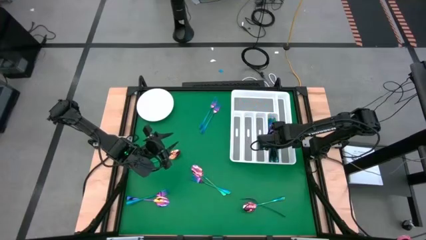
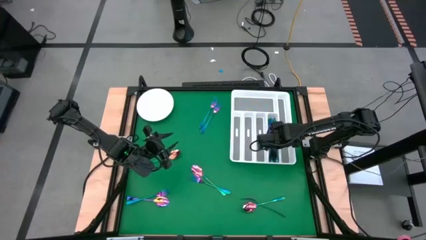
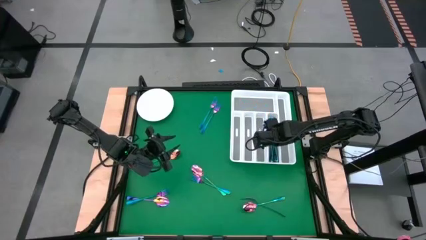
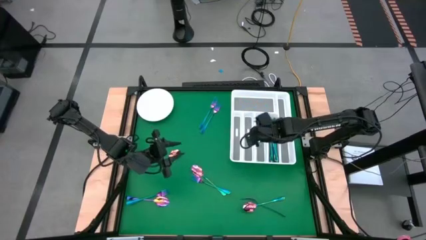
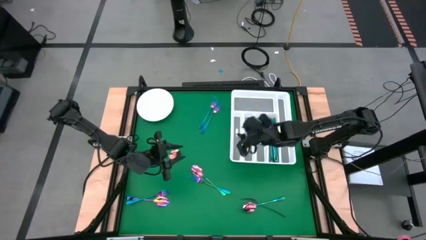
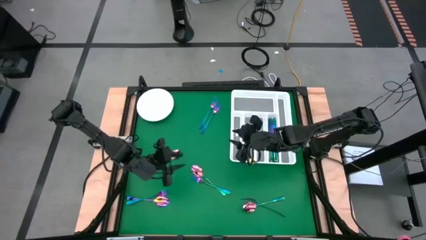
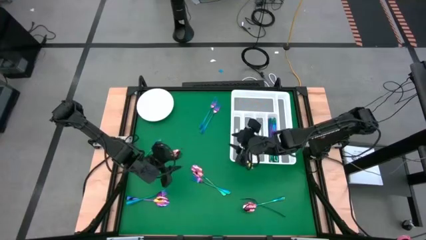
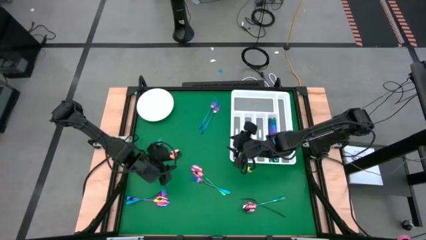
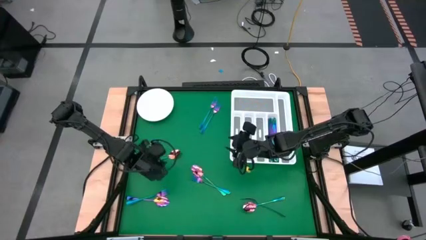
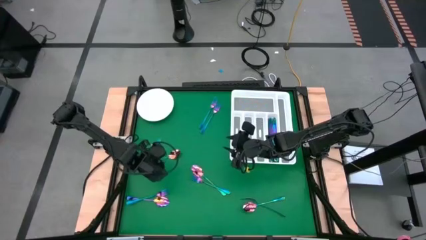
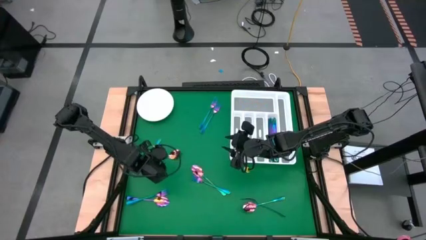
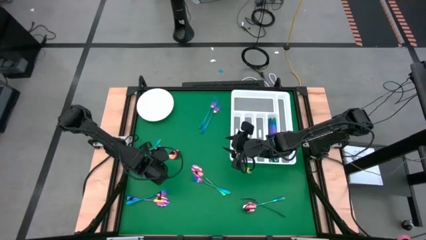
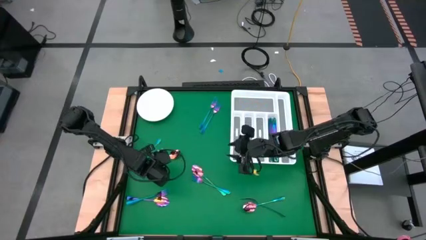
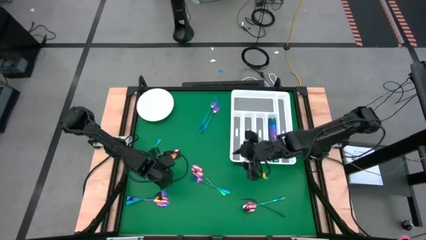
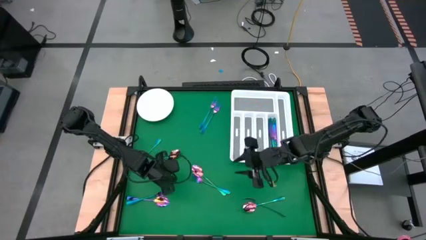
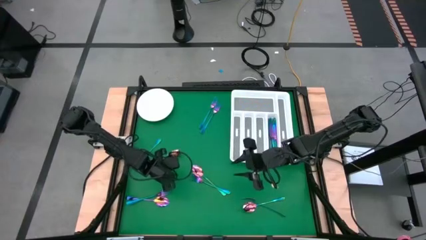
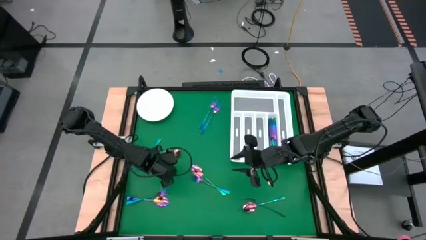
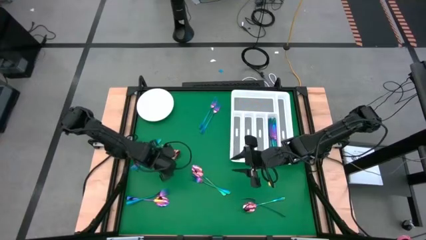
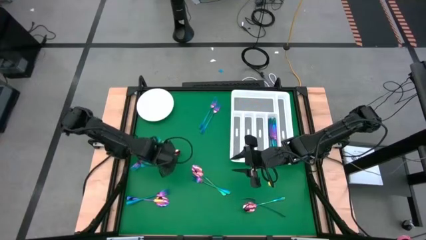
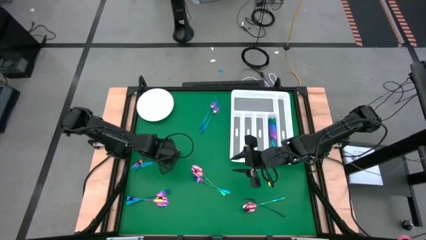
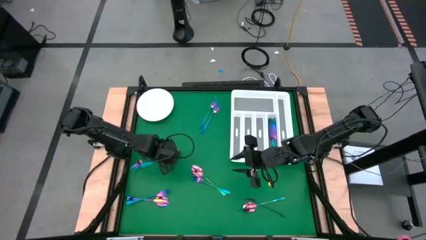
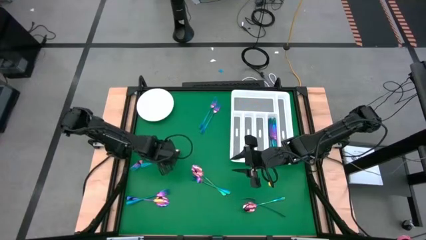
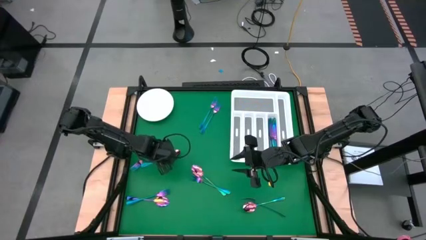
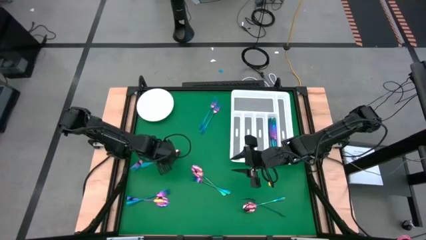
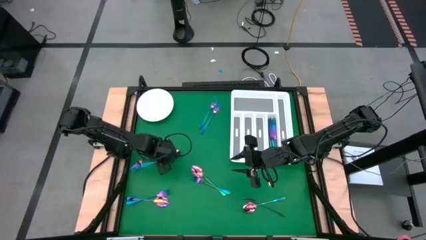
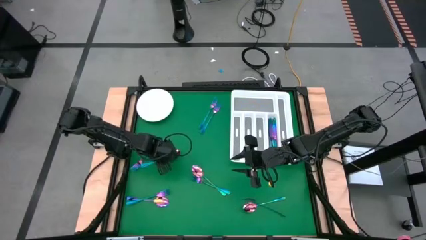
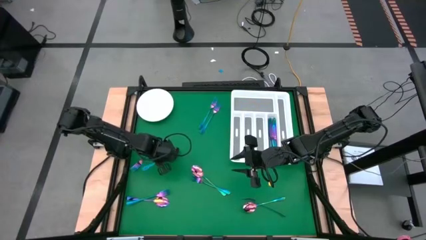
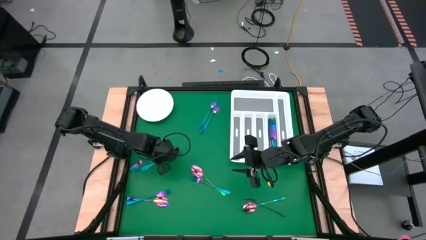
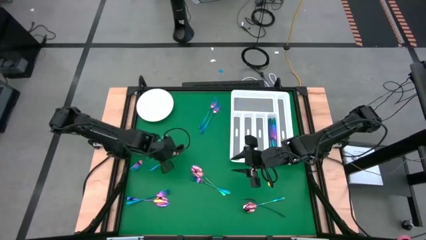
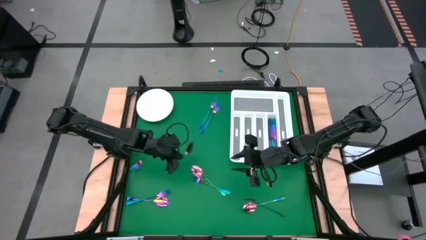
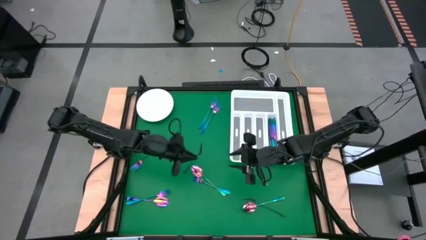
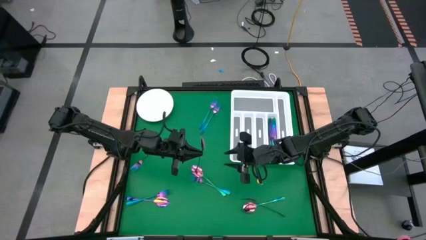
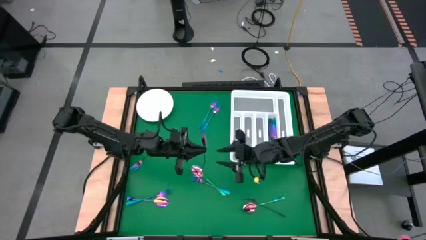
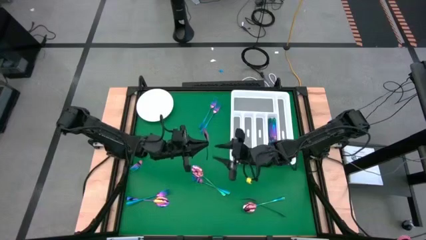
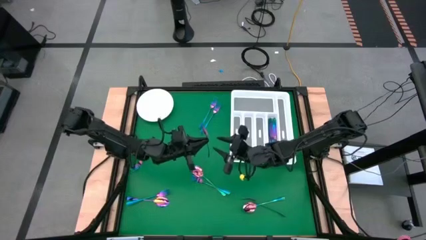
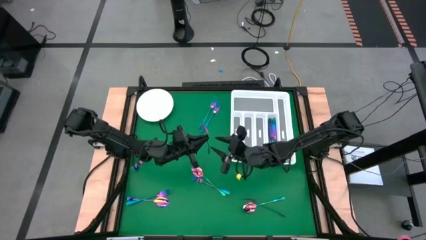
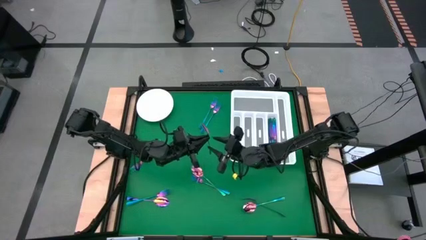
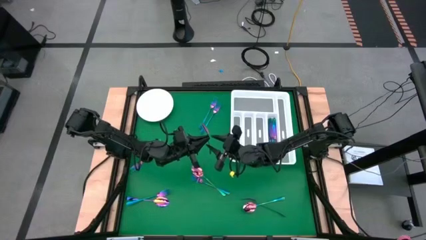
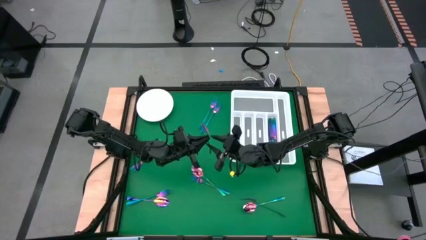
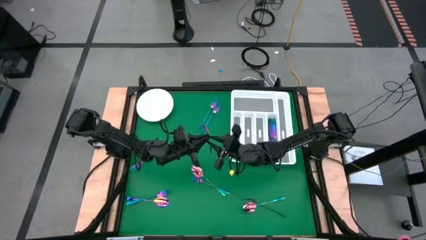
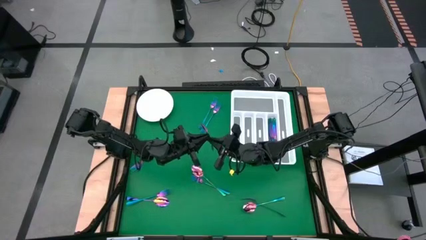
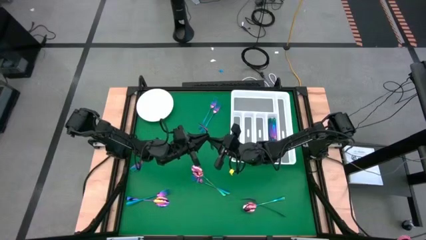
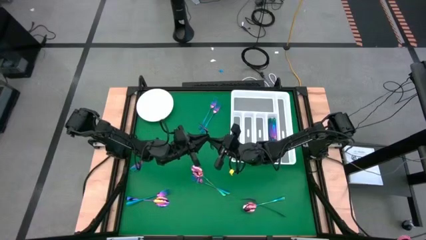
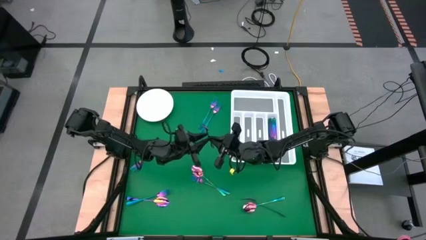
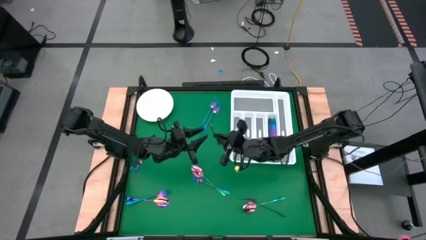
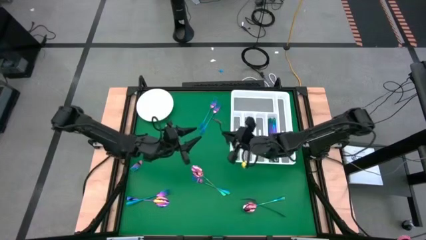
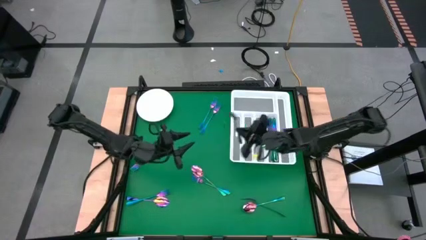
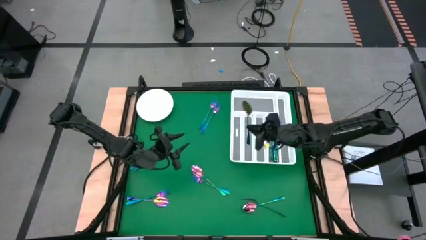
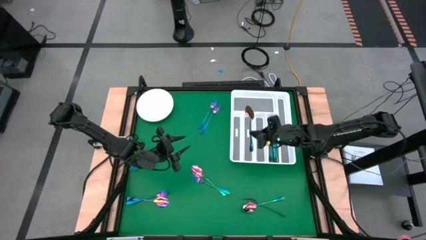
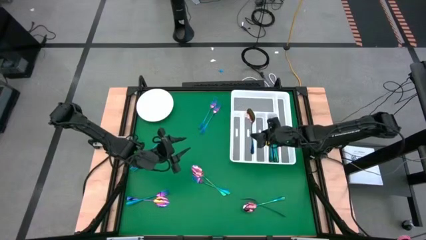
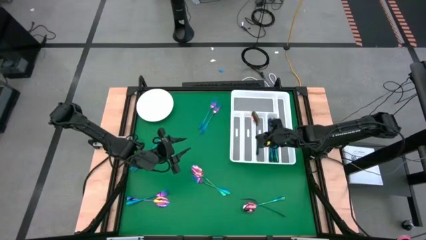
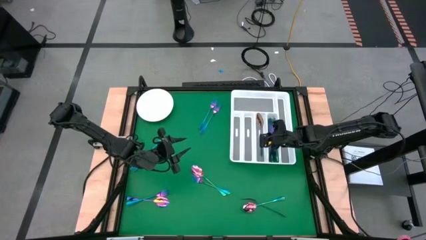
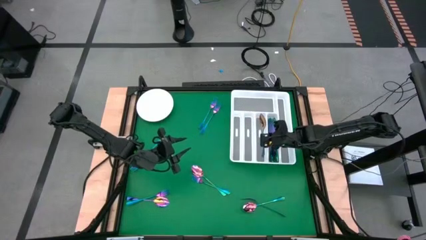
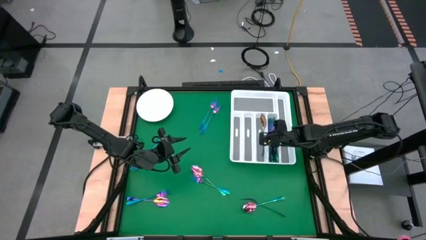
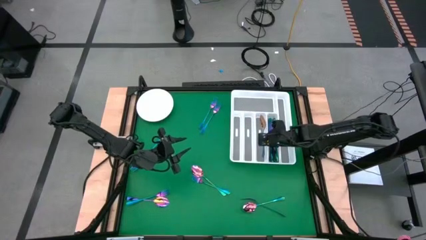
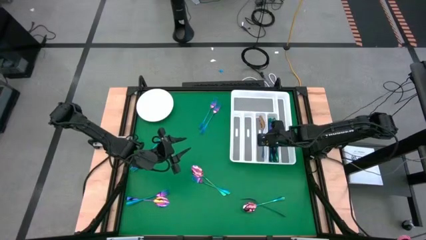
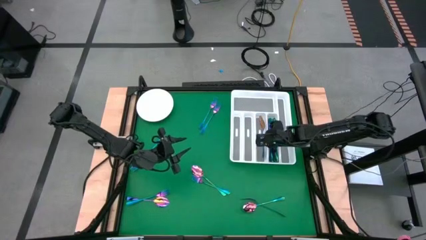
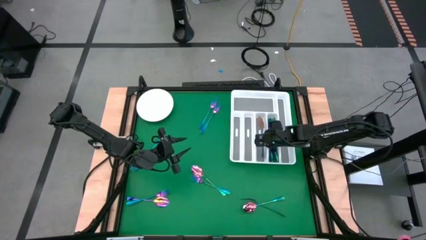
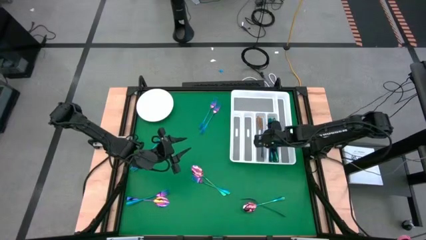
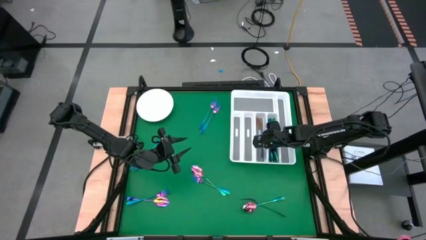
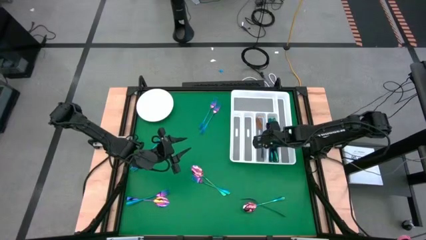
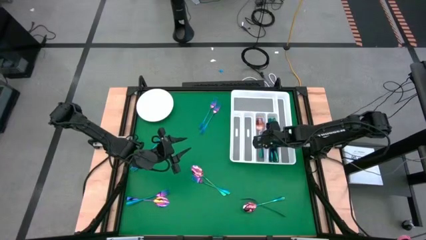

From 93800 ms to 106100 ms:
Task: Sort silverware
Put the blue spoon into the white cutlery tray

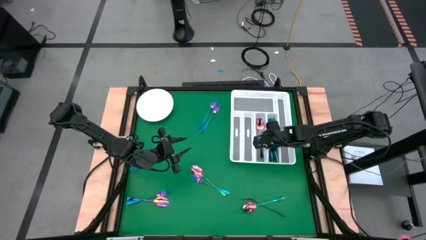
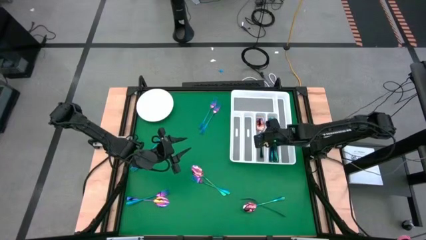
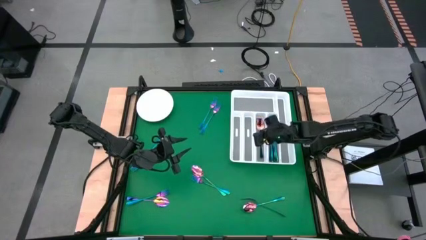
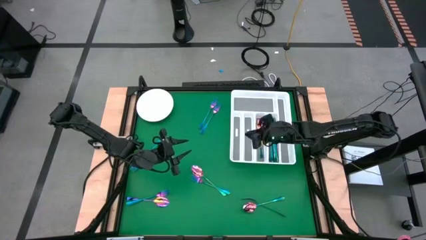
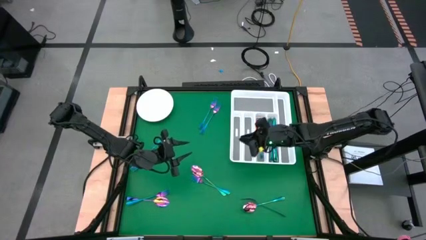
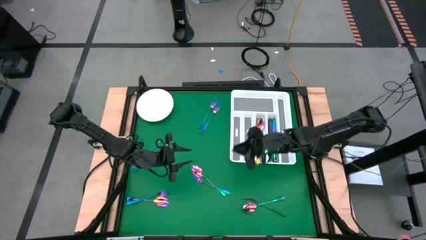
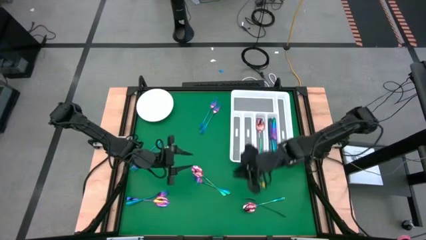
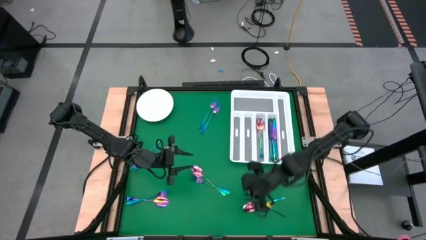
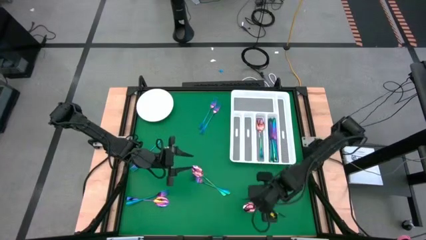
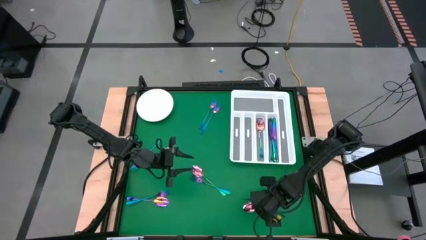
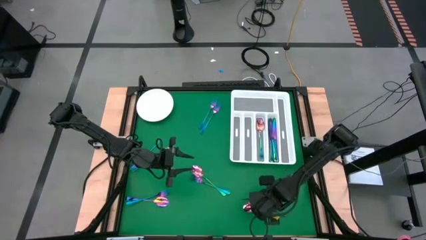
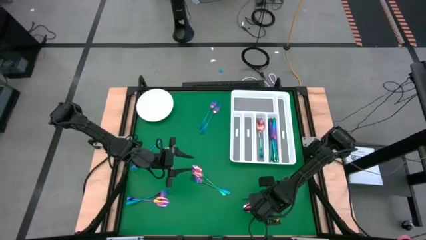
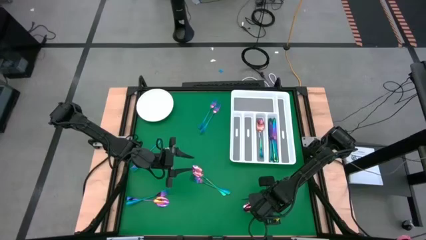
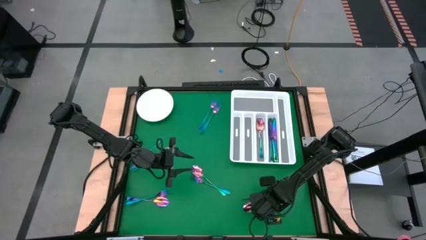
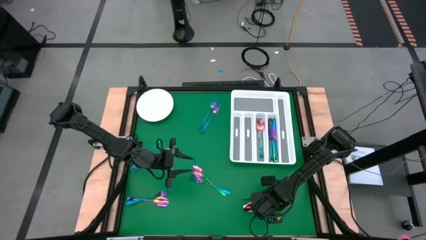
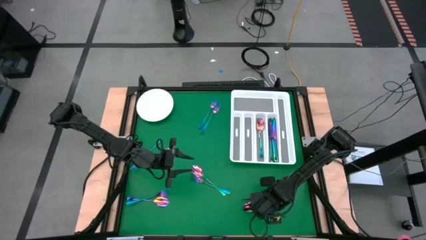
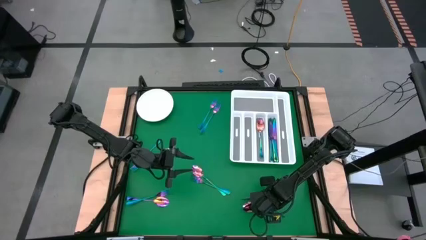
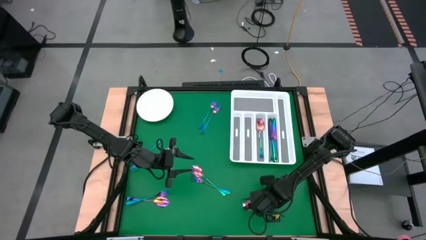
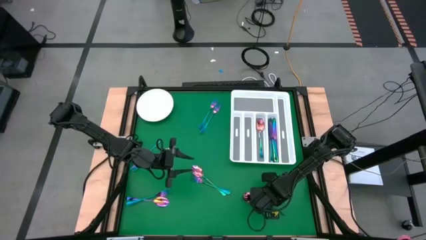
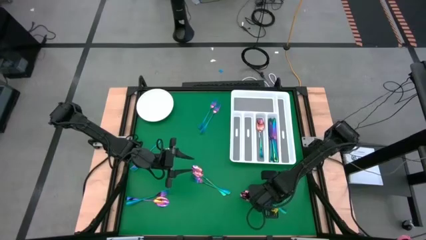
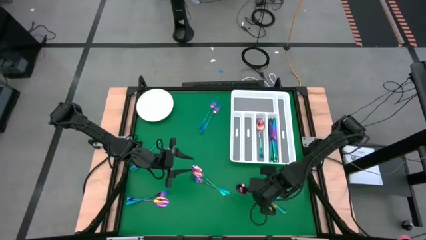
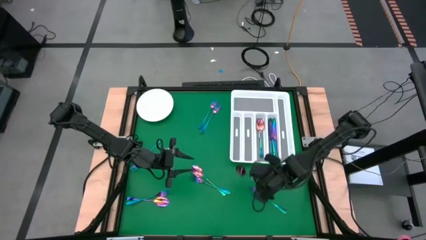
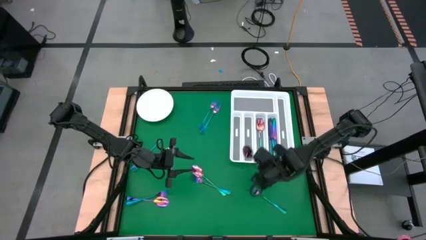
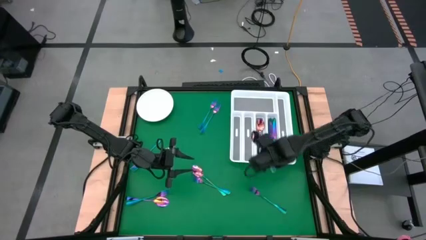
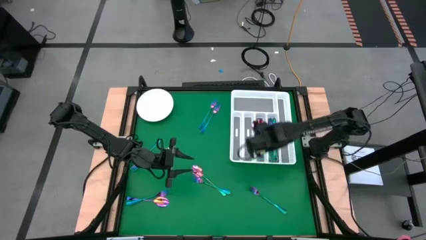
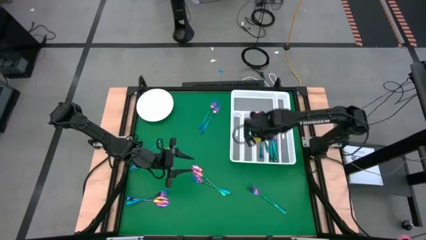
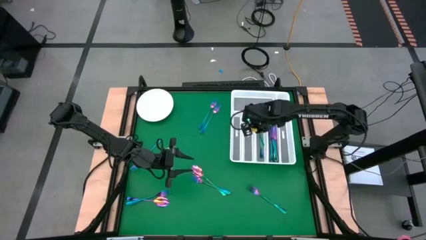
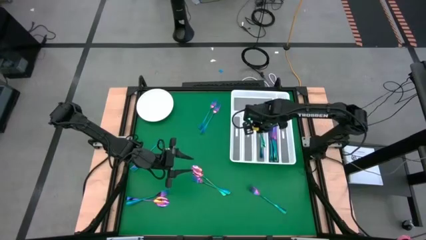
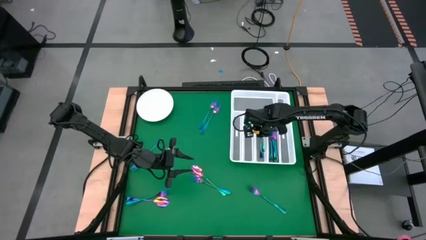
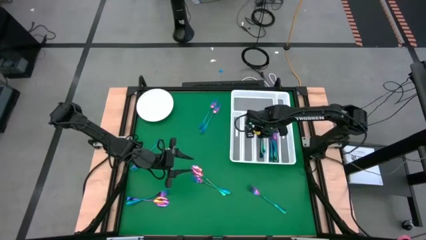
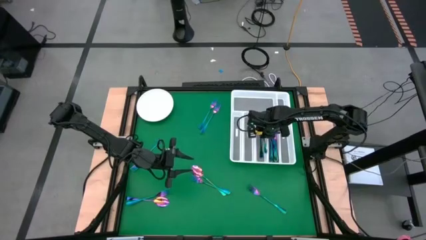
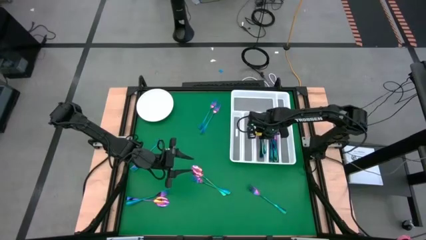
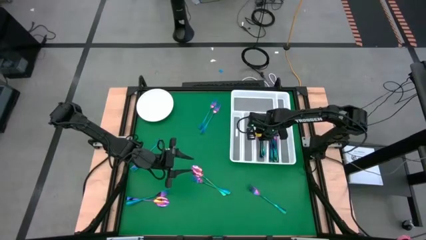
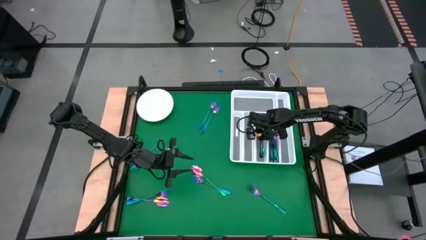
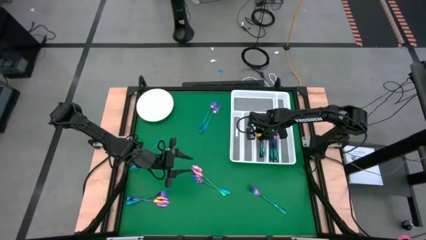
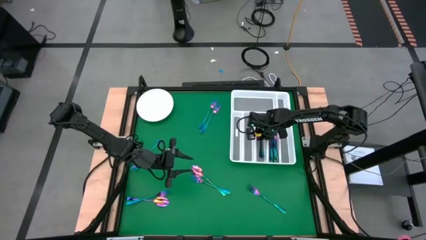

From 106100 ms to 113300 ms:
Put the blue spoon into the white cutlery tray
